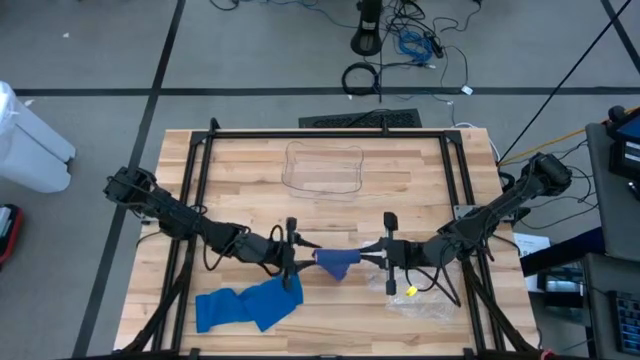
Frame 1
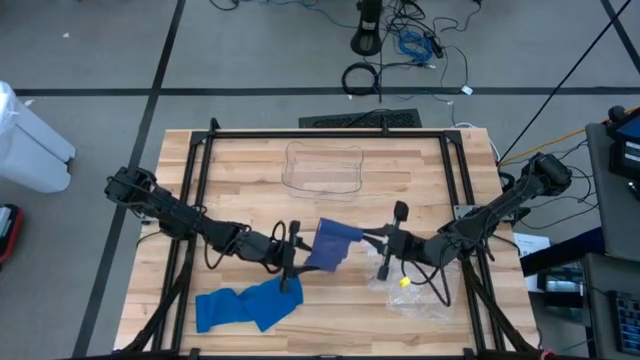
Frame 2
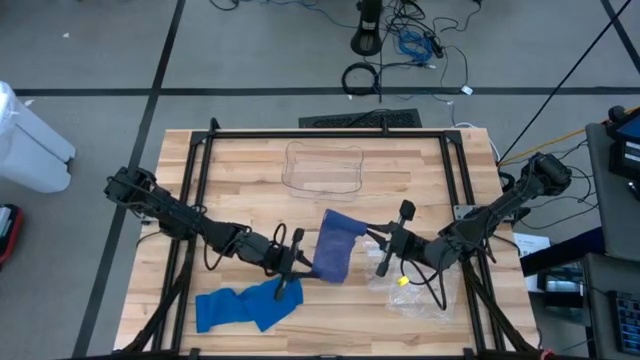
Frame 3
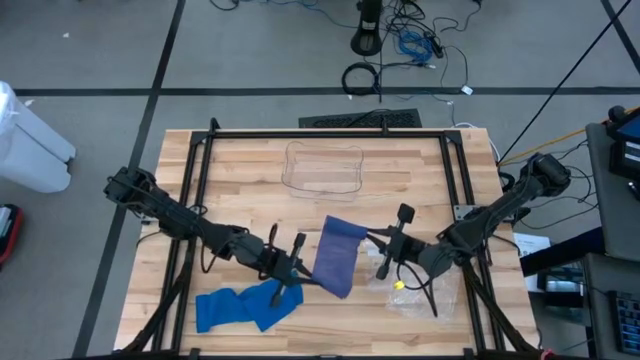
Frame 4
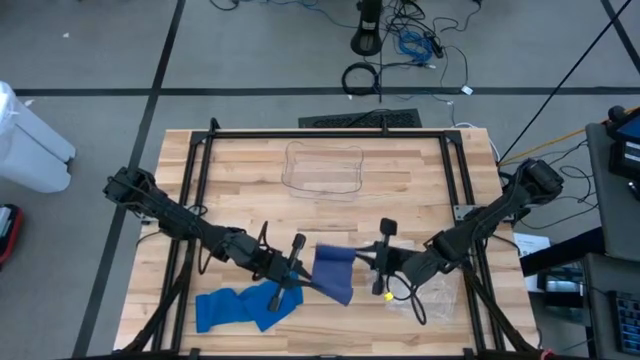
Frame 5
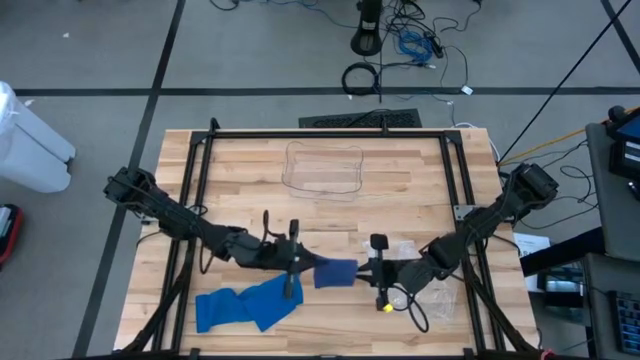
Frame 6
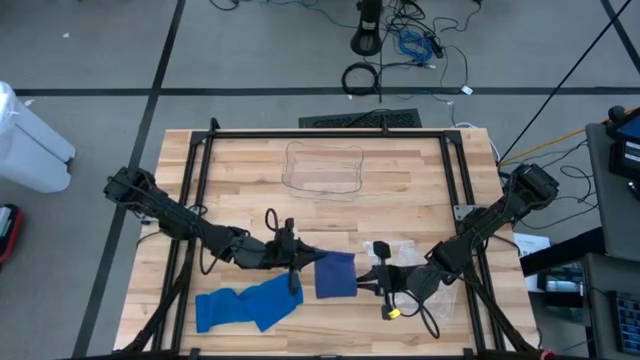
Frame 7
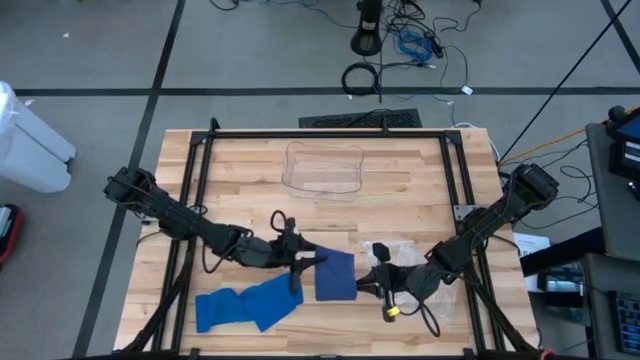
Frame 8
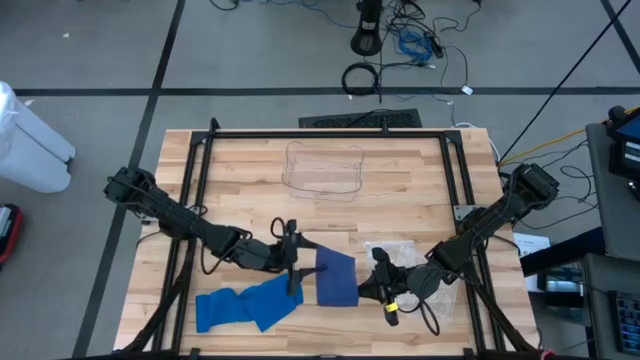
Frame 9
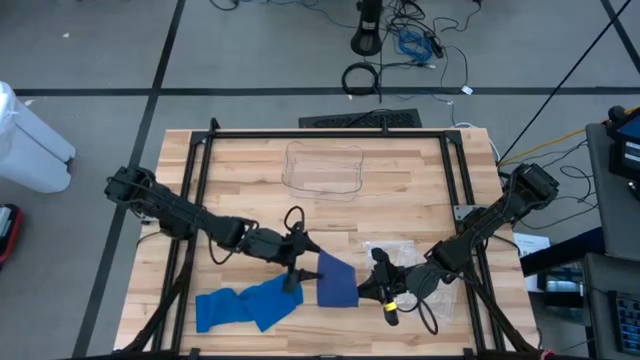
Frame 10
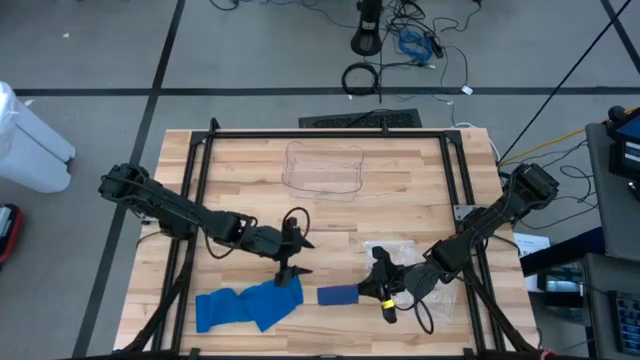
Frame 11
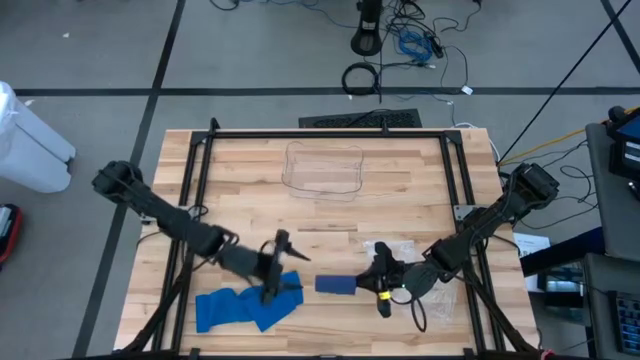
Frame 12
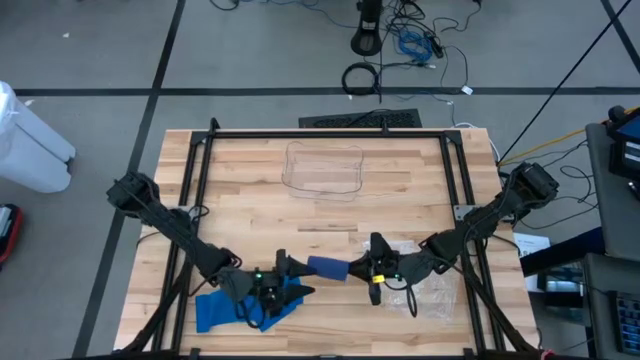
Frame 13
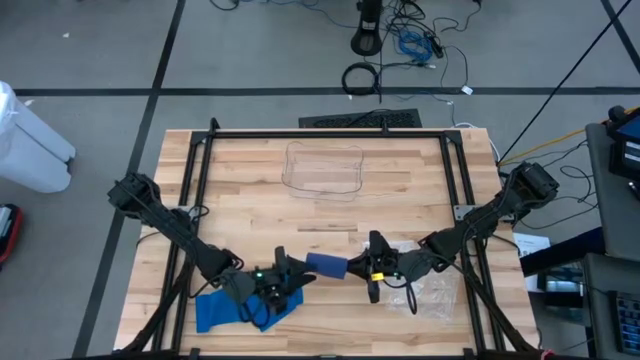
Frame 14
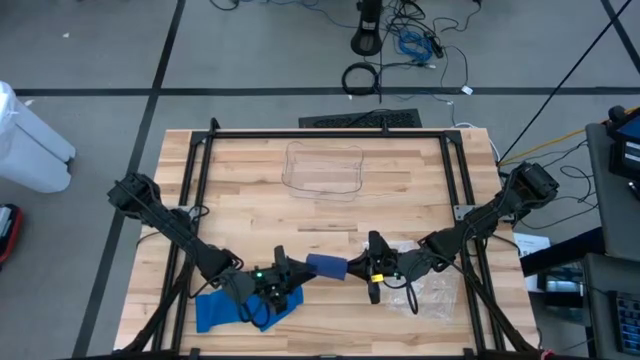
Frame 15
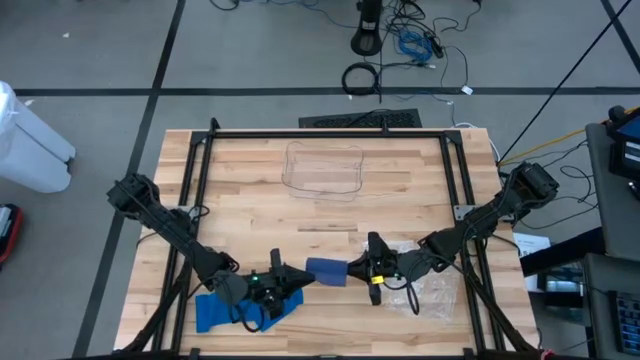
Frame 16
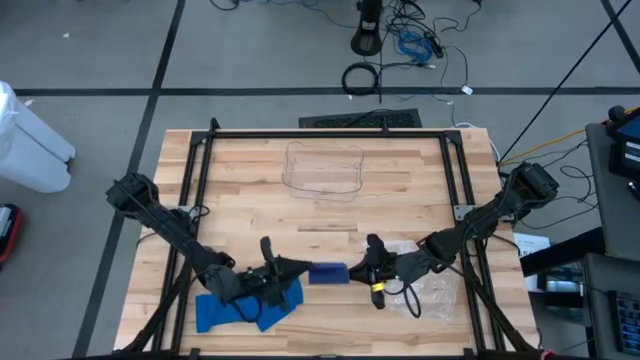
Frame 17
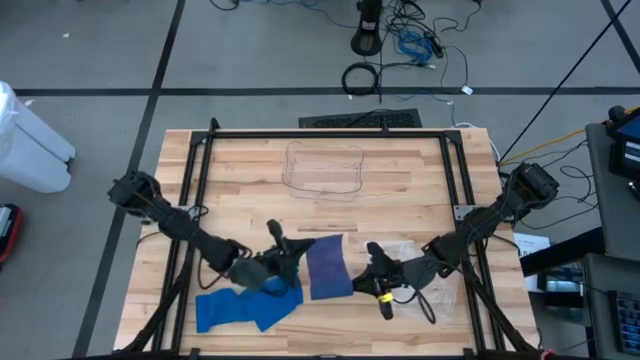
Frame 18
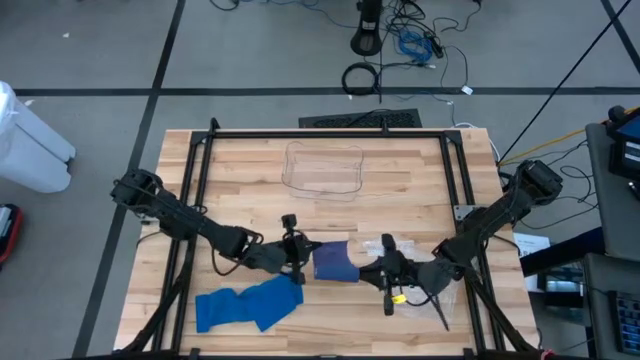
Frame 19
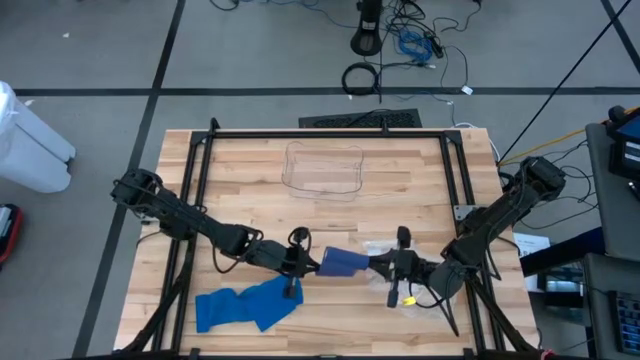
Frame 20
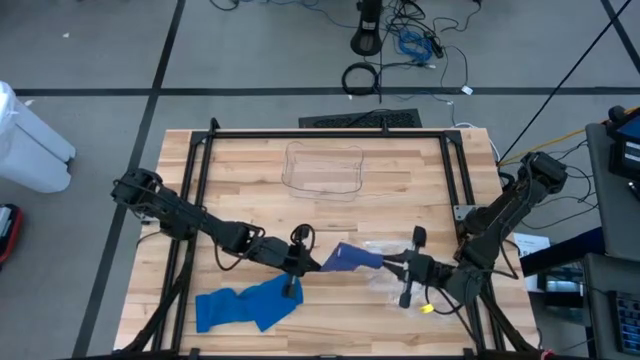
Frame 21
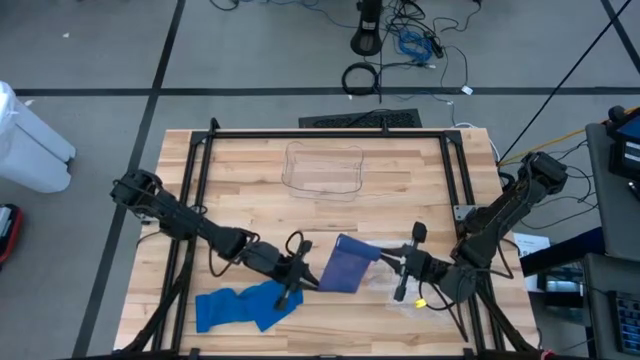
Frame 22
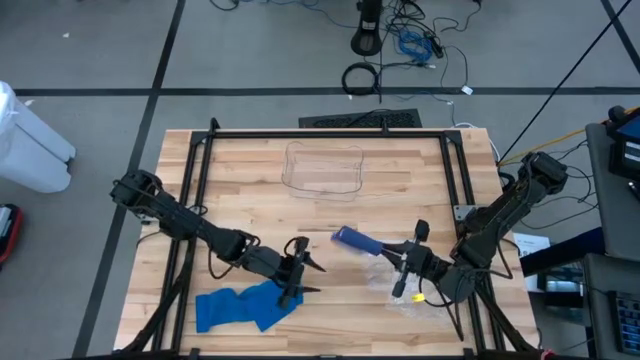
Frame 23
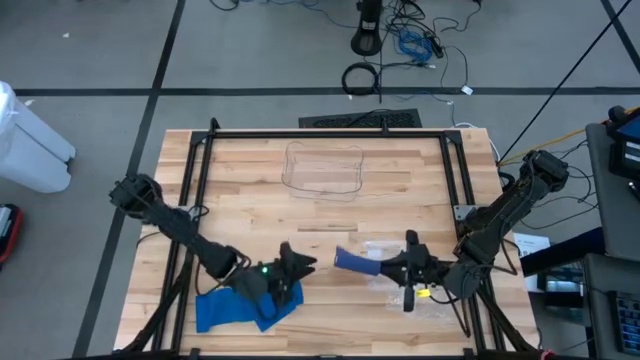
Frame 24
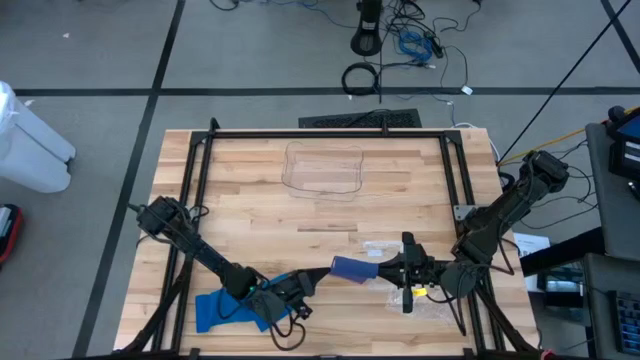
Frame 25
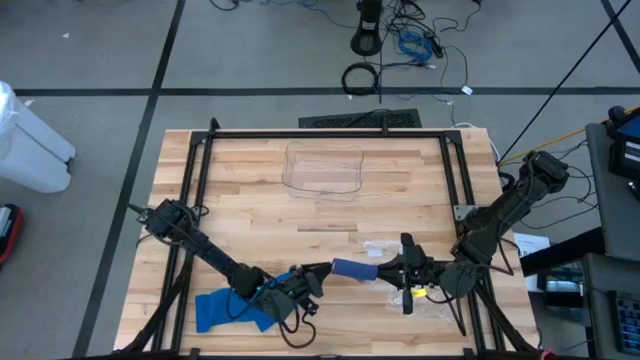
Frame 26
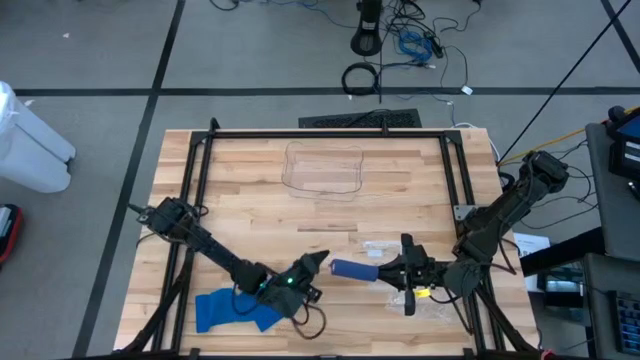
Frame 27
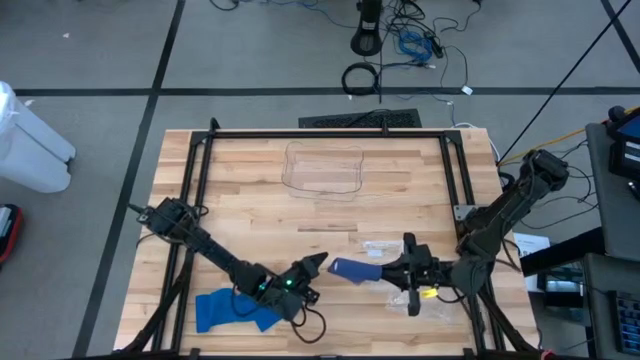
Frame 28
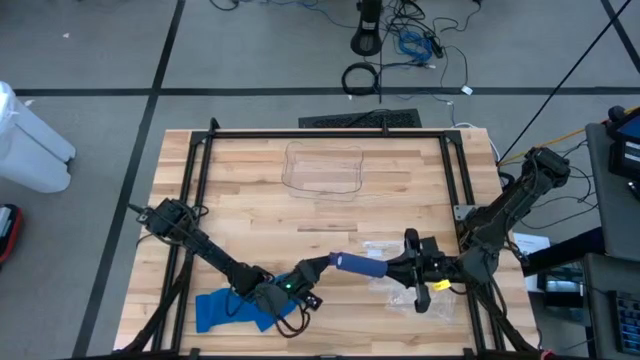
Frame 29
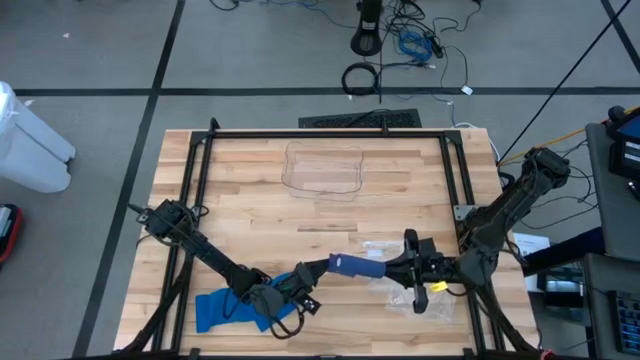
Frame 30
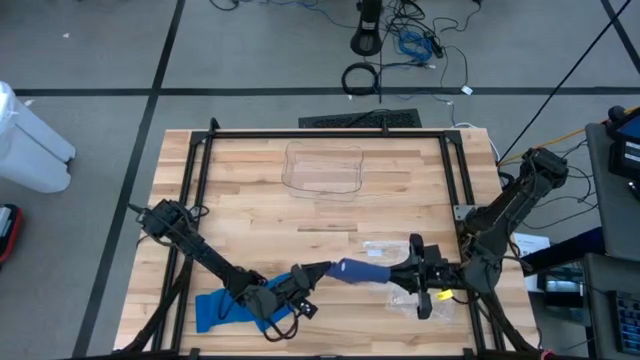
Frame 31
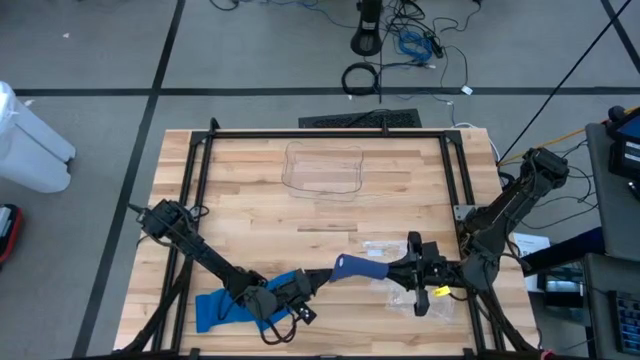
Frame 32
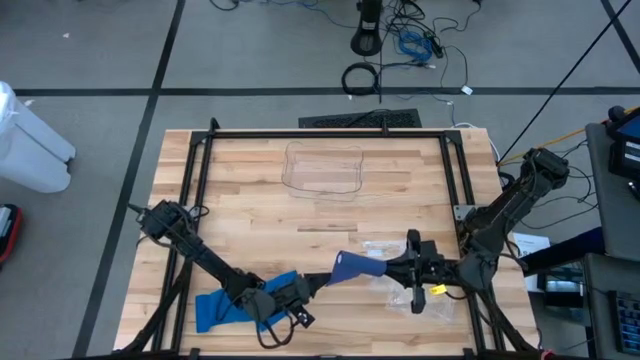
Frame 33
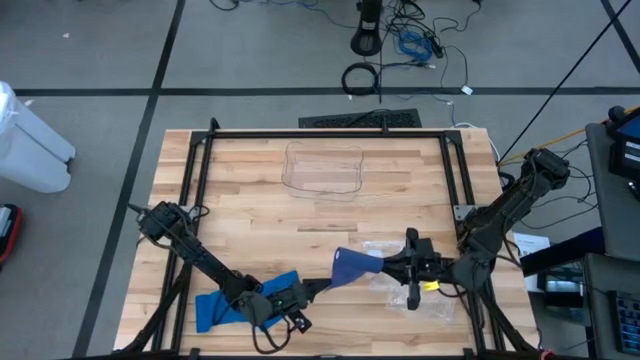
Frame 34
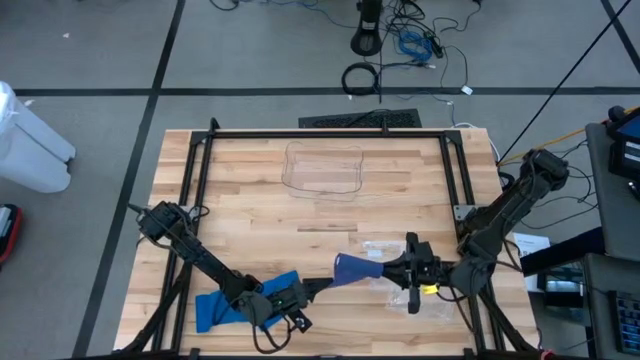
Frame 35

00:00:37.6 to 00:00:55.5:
Task: Roll bandage
Roll the purple bandage

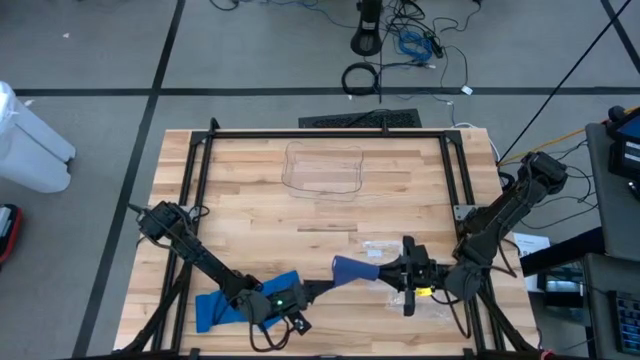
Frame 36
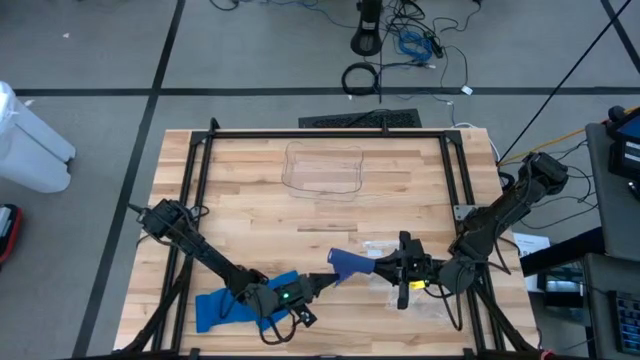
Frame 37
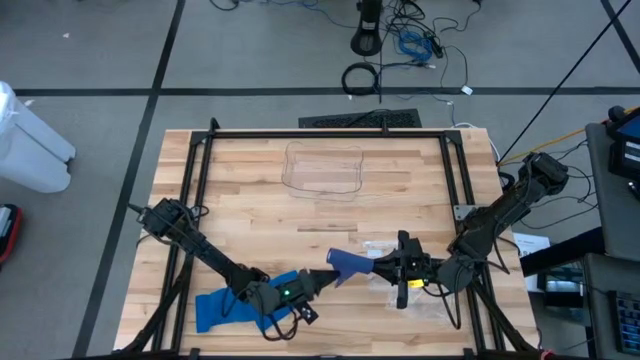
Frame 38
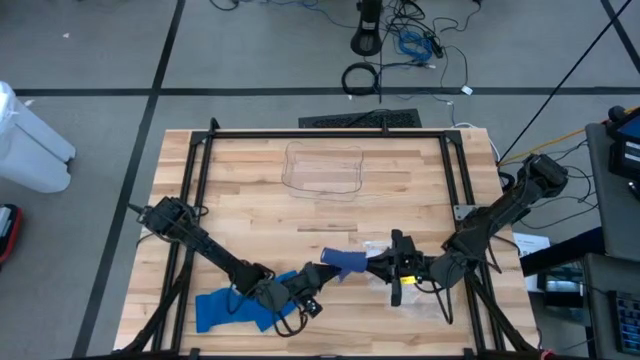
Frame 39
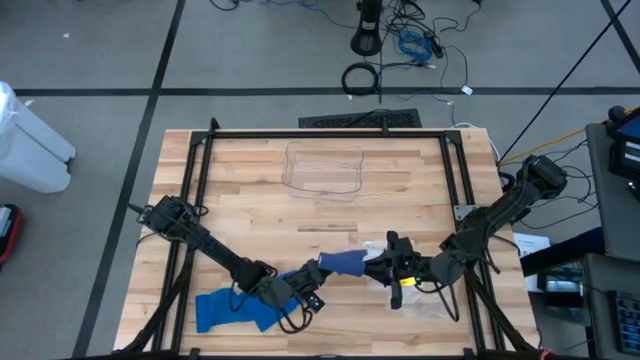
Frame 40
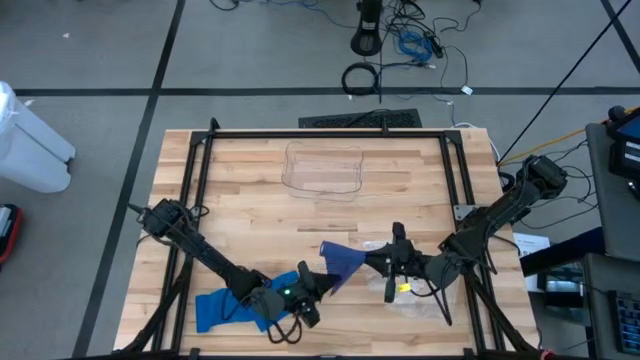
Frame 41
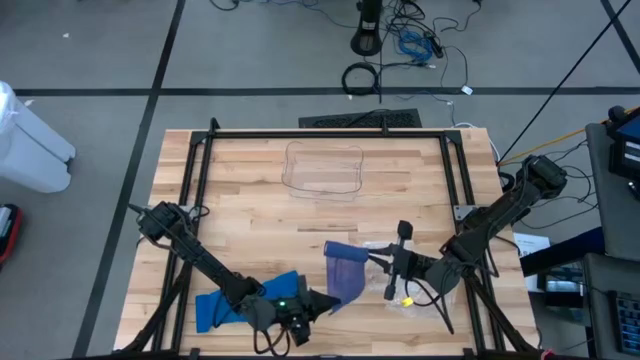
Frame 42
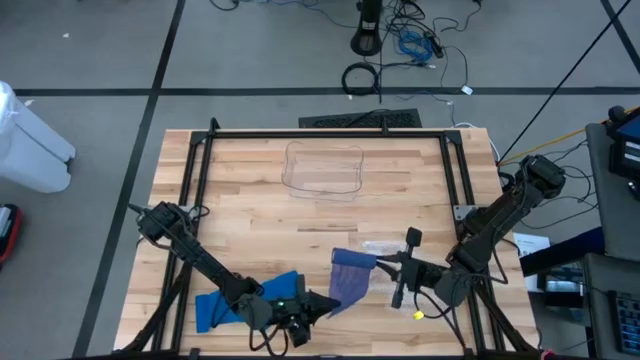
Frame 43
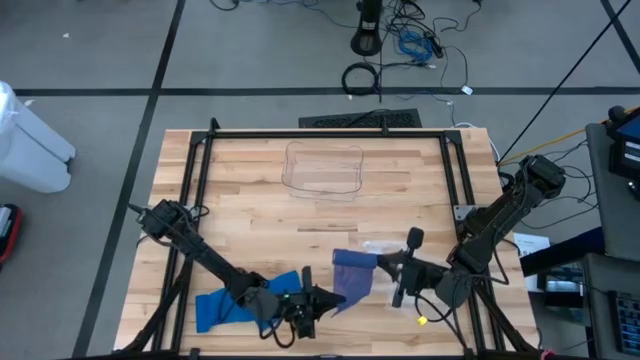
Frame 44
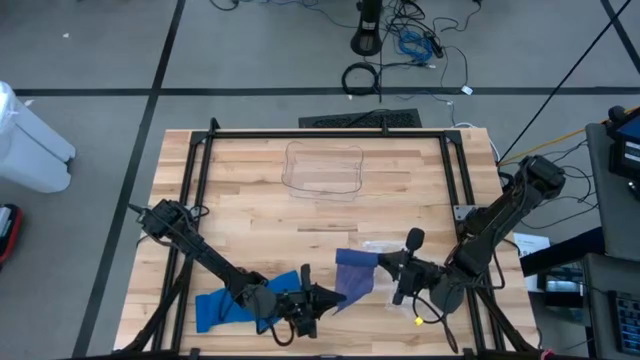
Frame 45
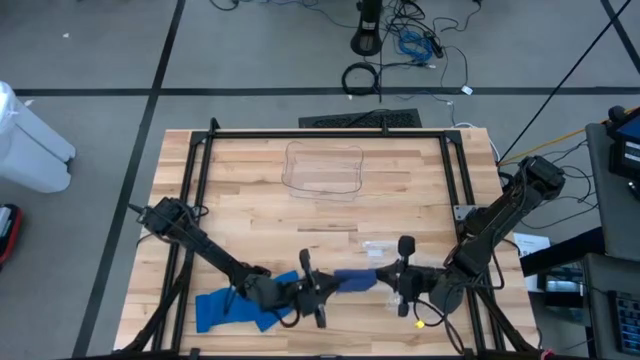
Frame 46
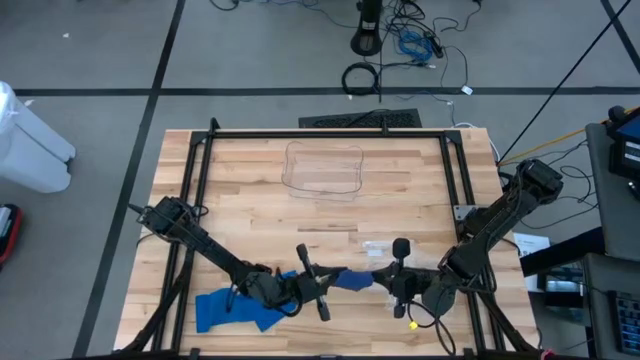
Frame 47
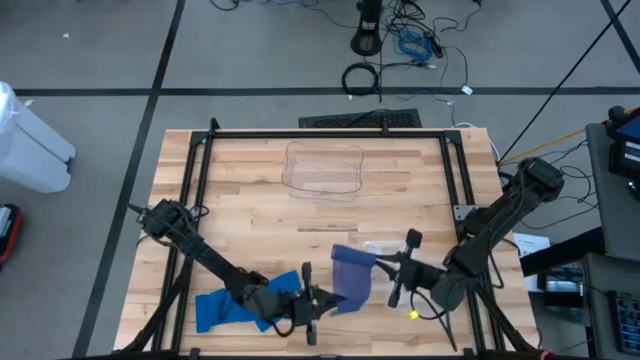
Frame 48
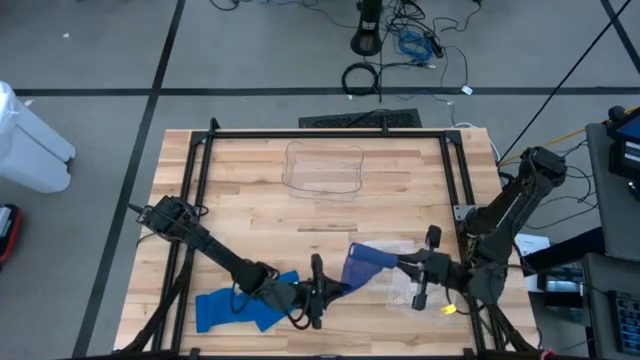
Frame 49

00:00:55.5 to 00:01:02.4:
Roll the purple bandage
